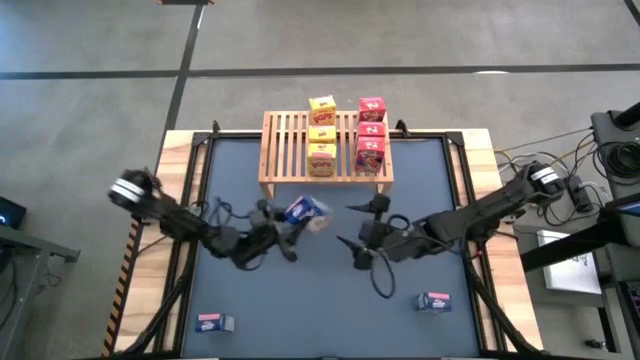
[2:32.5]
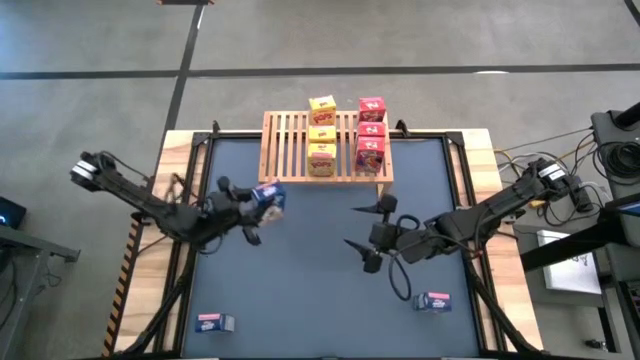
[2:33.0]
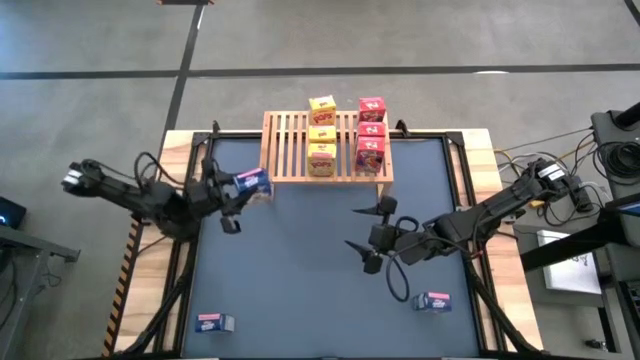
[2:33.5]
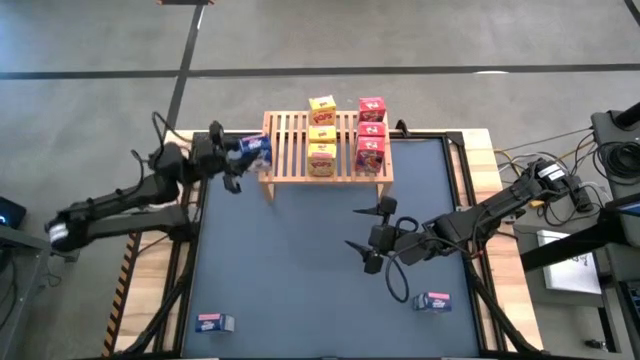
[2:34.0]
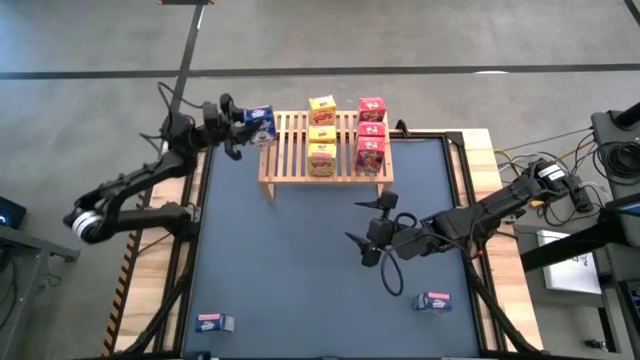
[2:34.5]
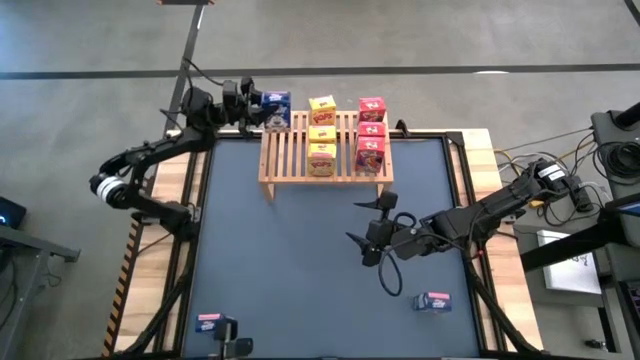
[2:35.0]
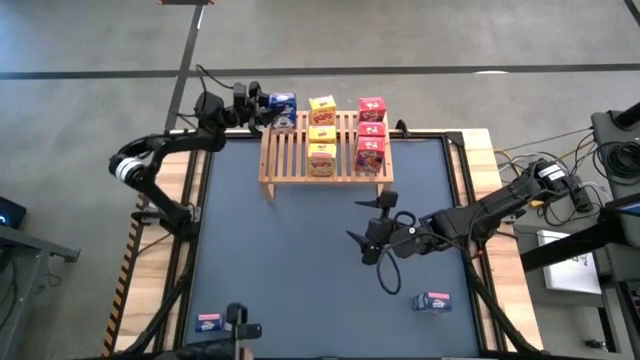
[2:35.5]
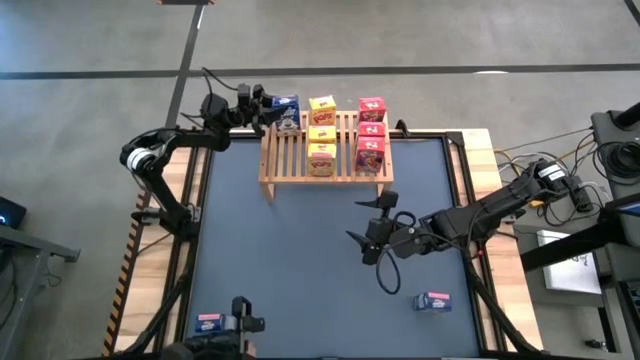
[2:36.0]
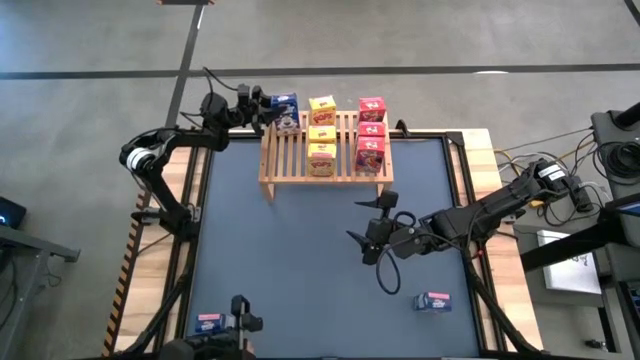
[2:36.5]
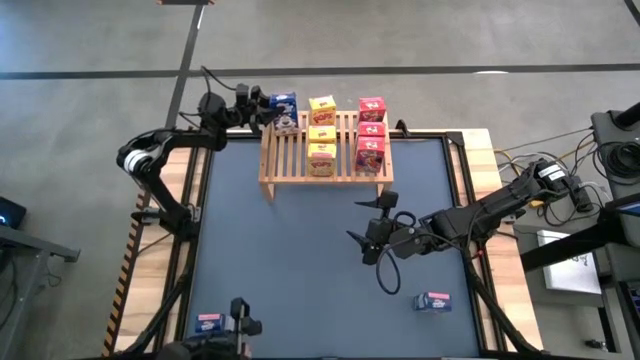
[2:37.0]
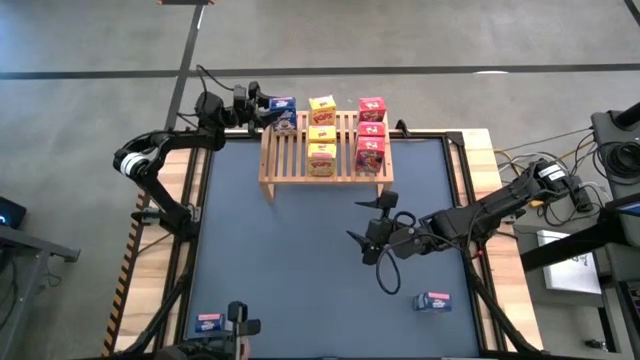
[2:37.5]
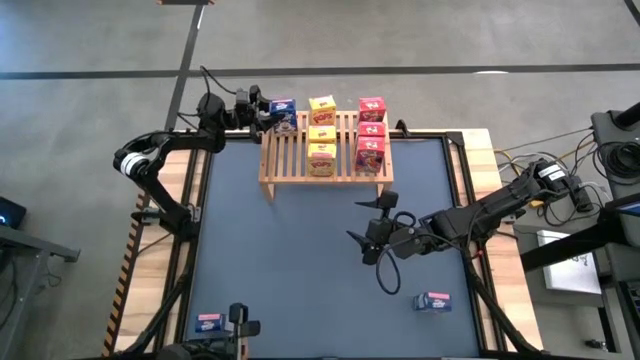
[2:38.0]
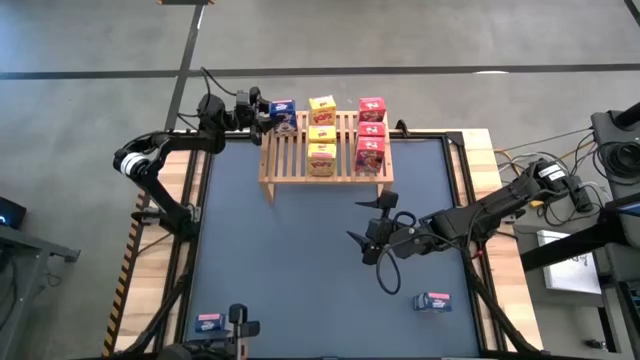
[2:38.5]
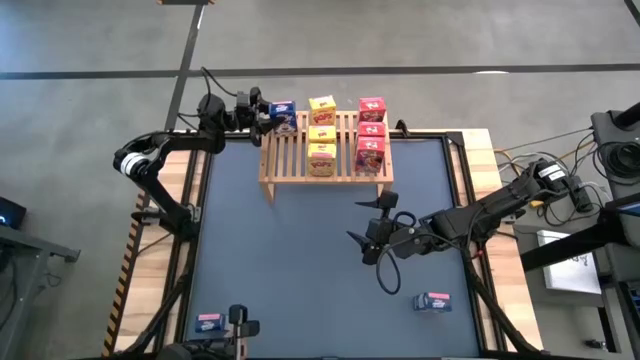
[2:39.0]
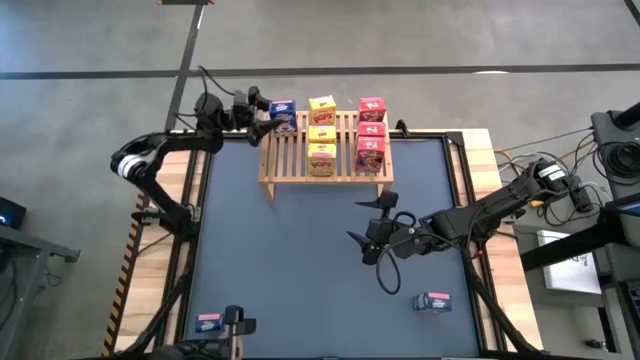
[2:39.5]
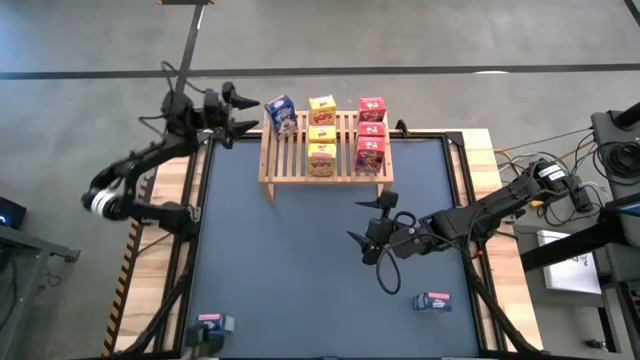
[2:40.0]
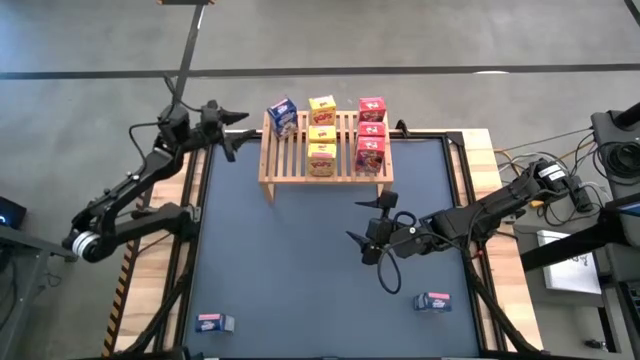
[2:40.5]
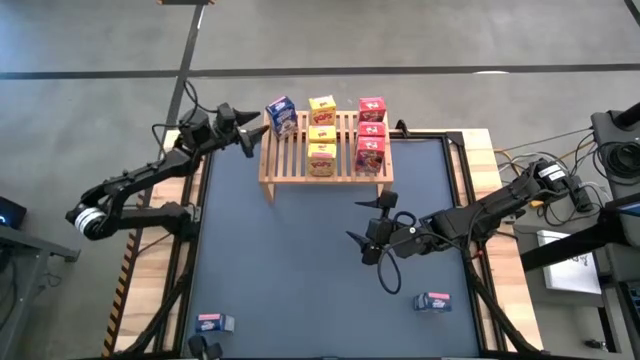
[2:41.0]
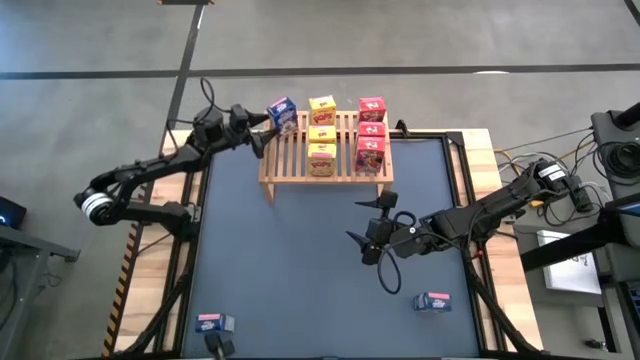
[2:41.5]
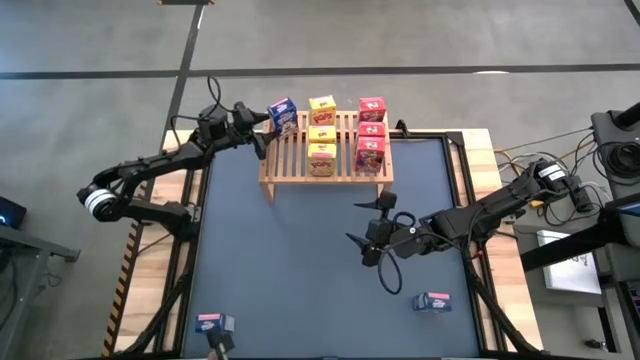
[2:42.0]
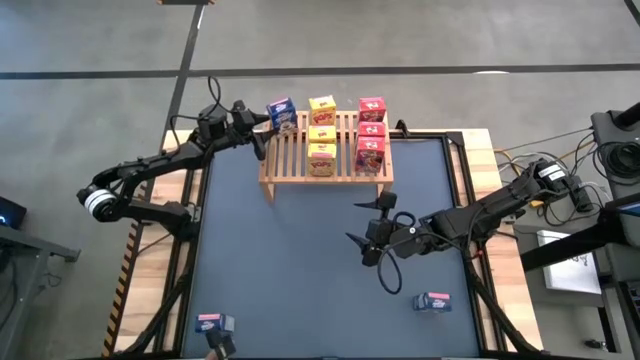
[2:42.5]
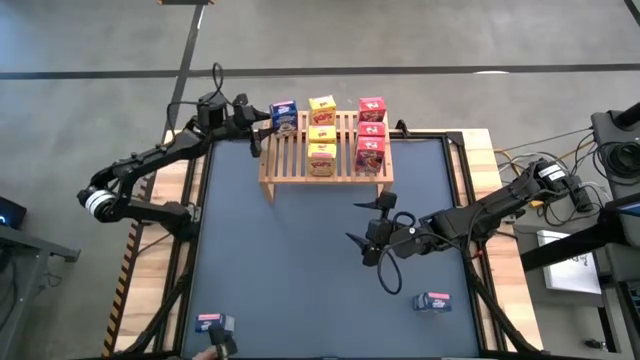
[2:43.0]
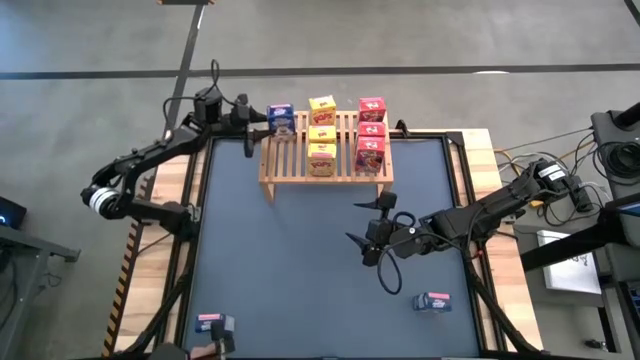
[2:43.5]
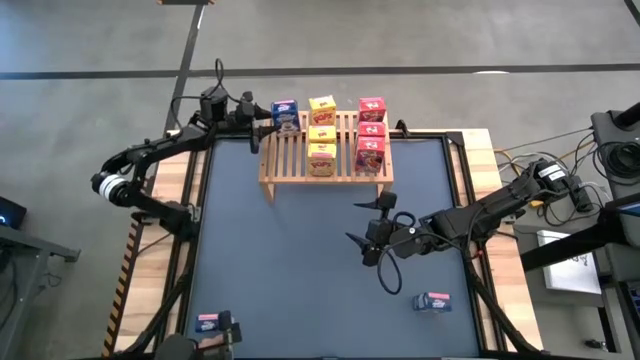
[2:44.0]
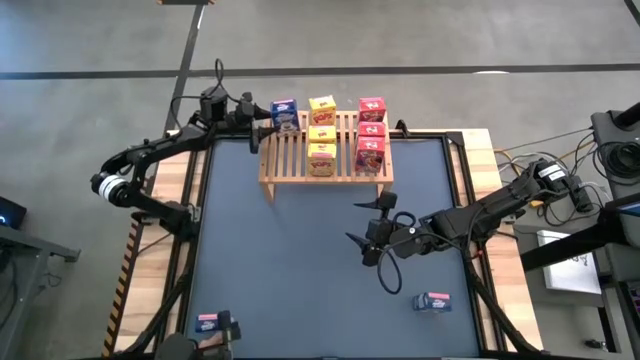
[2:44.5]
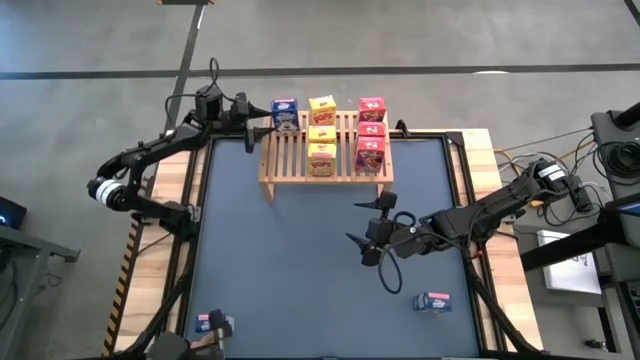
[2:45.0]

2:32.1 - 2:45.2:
Task: Stack cereal on shelf
Put the top blue cereal box on the shelf

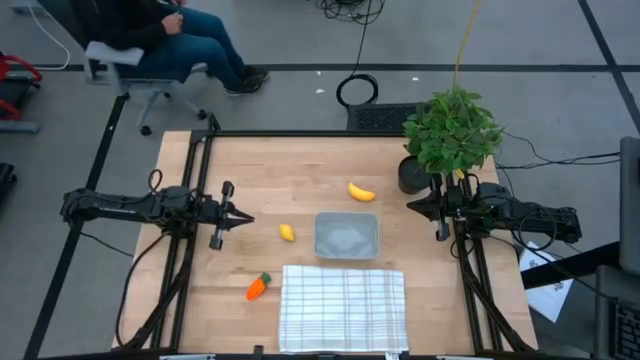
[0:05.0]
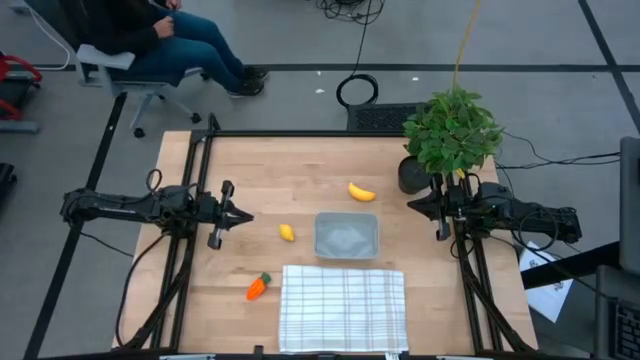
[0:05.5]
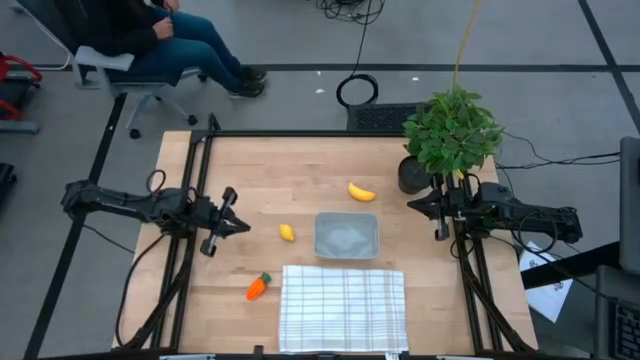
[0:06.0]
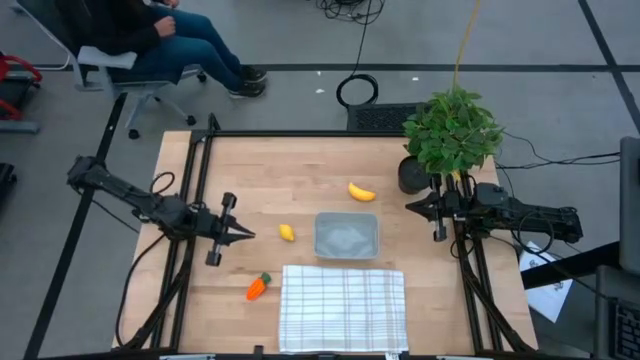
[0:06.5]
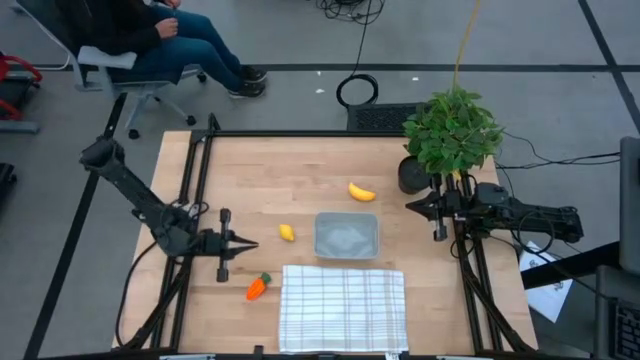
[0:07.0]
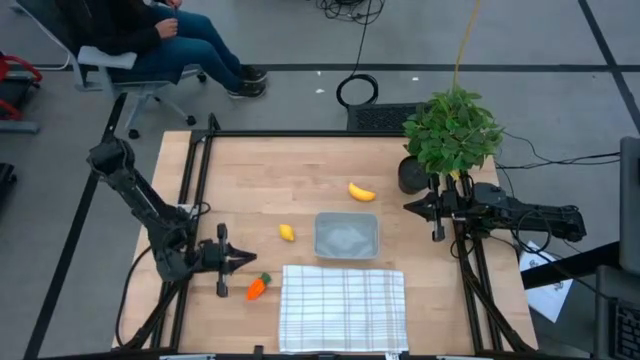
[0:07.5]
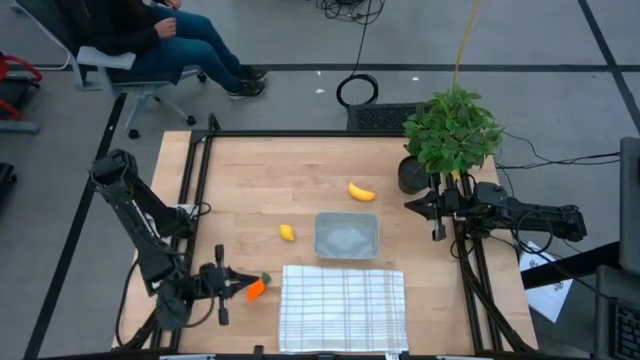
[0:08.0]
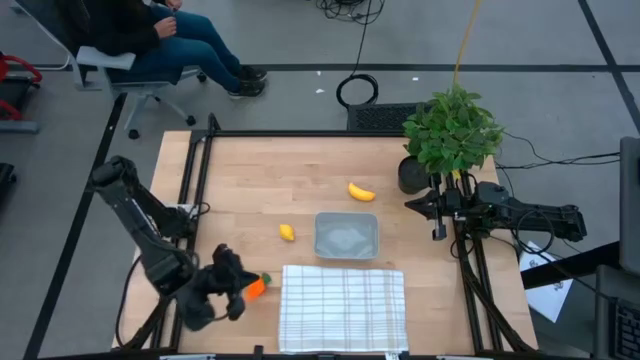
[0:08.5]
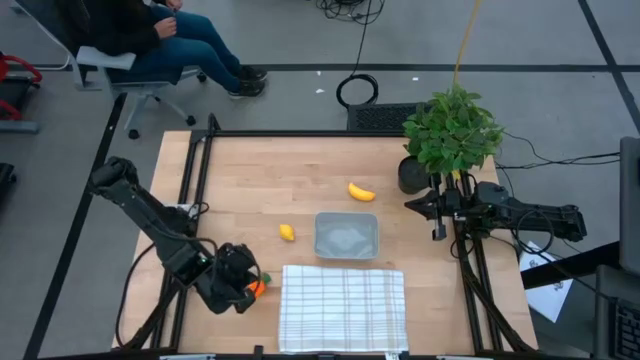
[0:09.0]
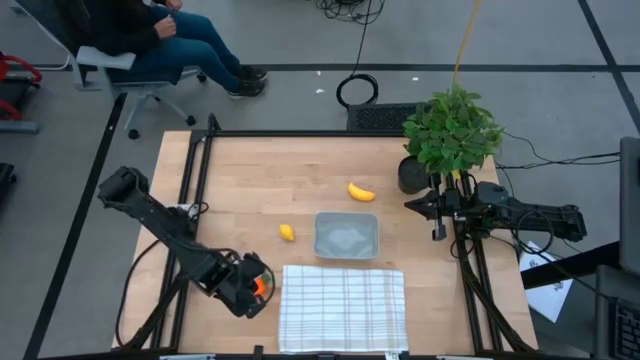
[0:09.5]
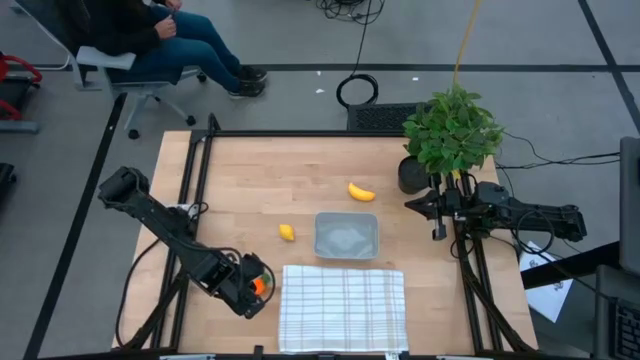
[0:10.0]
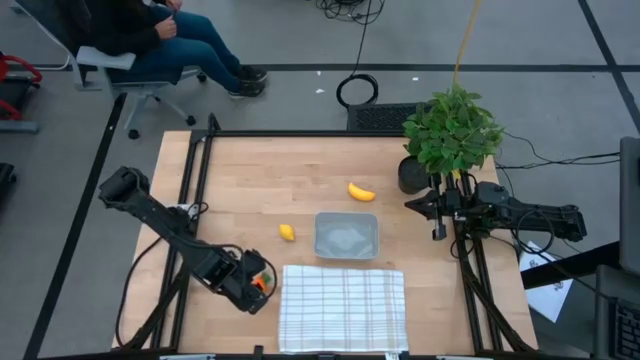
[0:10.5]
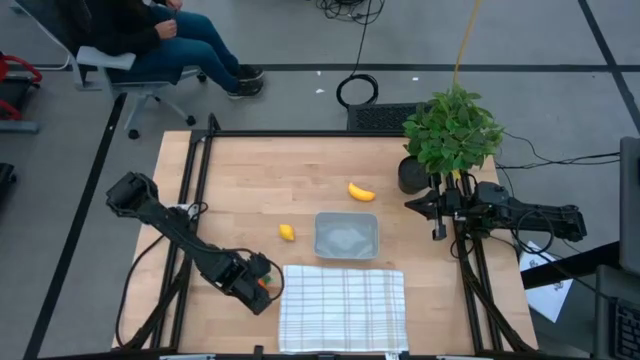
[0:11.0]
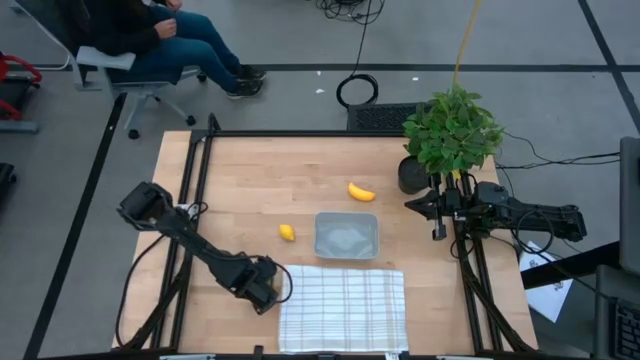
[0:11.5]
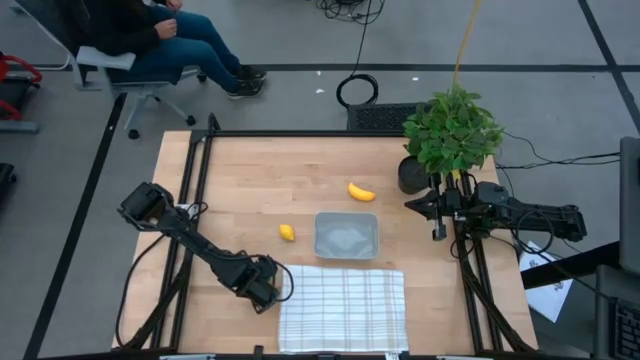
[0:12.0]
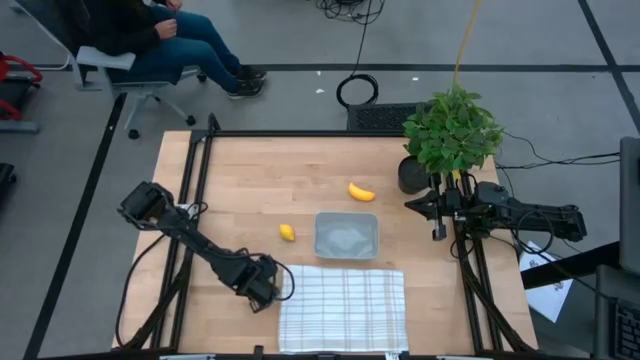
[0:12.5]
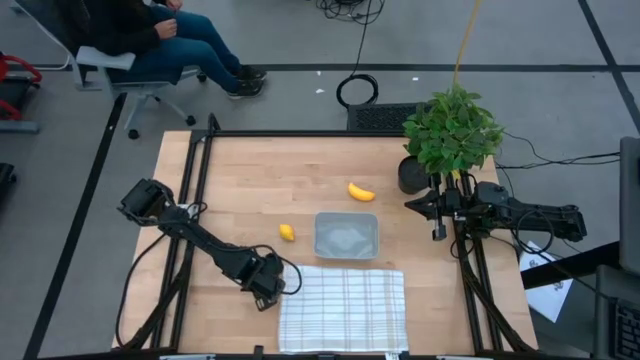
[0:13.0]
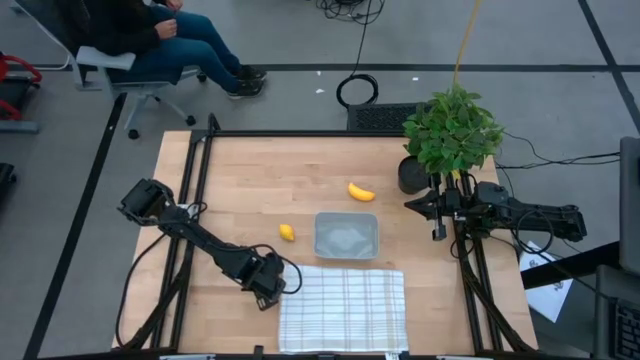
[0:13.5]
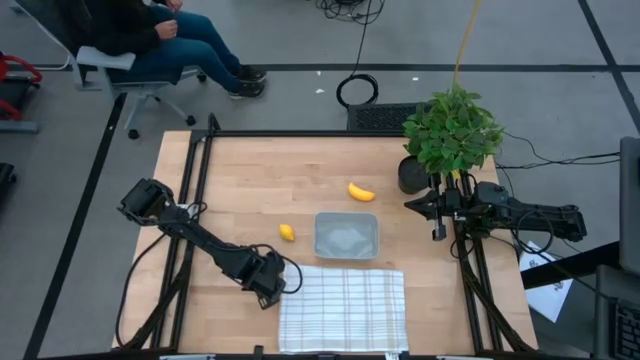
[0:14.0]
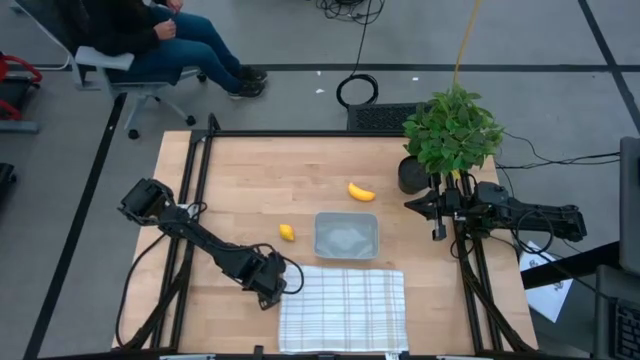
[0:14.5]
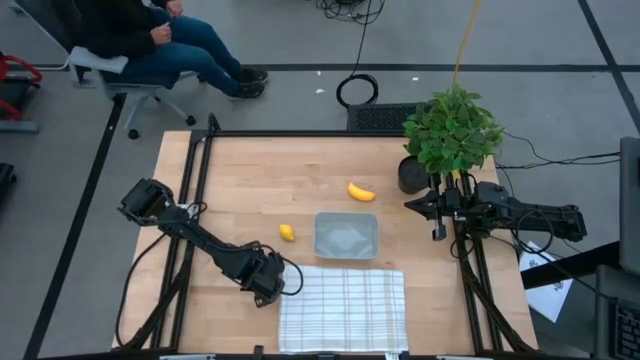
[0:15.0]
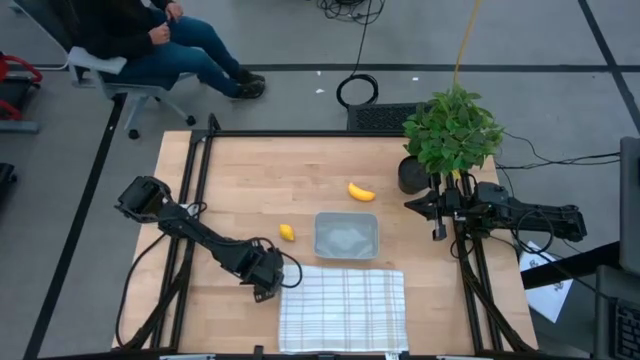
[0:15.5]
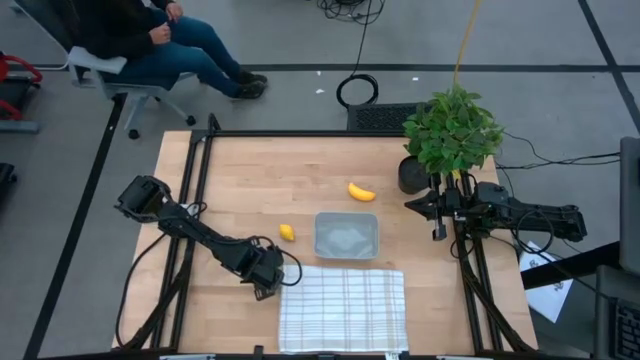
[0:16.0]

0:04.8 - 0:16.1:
Task: Pick and placing Produce into tupperware
Put the carrot into the gray bin
